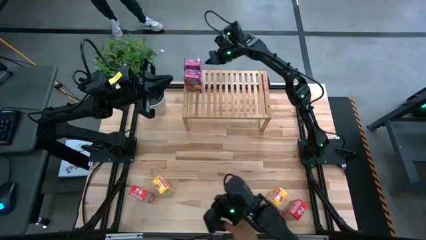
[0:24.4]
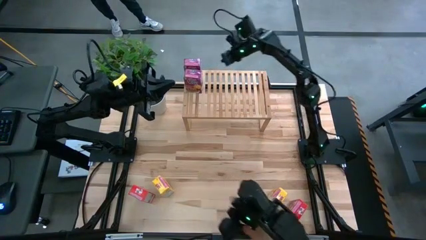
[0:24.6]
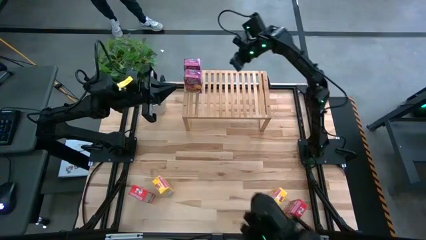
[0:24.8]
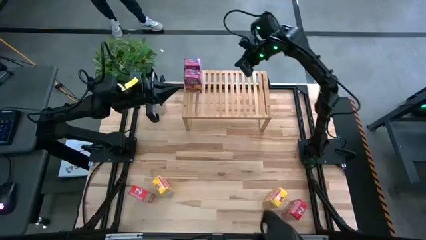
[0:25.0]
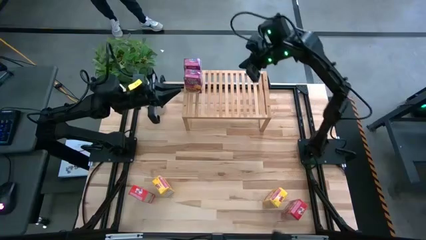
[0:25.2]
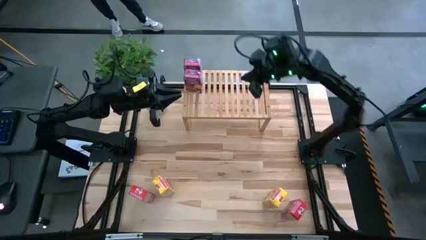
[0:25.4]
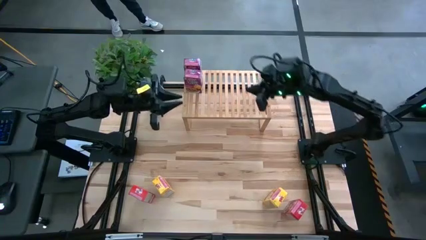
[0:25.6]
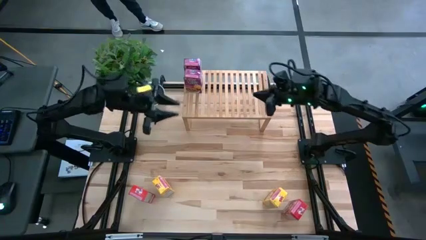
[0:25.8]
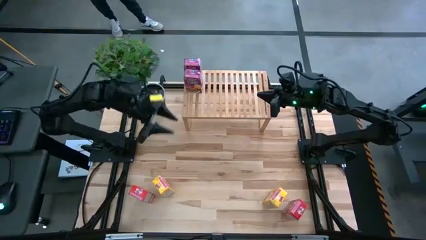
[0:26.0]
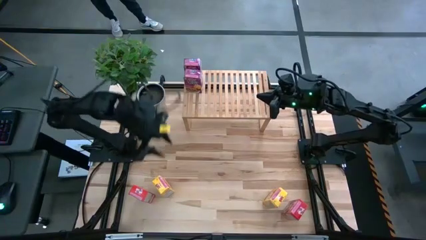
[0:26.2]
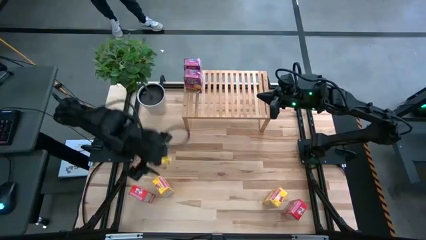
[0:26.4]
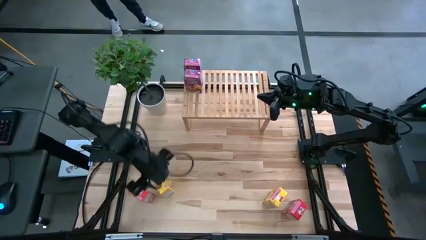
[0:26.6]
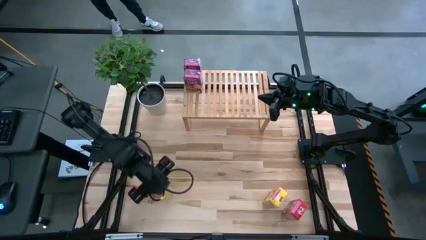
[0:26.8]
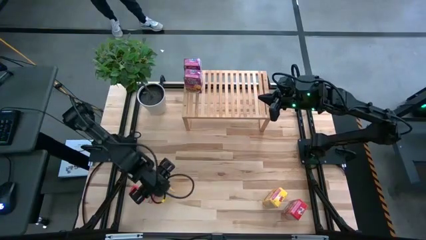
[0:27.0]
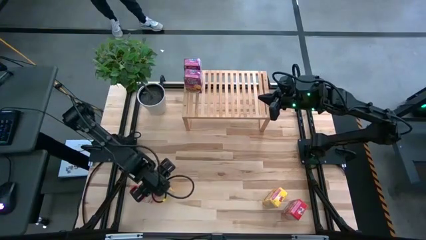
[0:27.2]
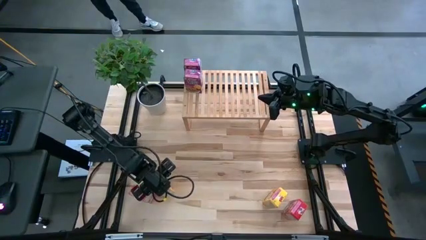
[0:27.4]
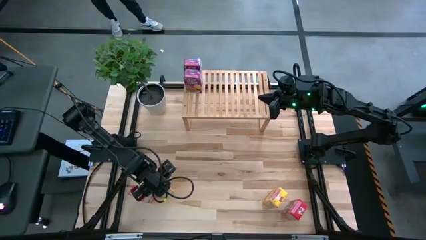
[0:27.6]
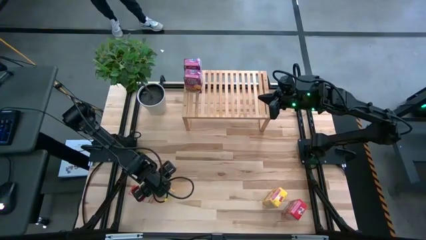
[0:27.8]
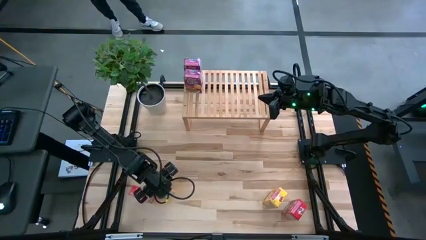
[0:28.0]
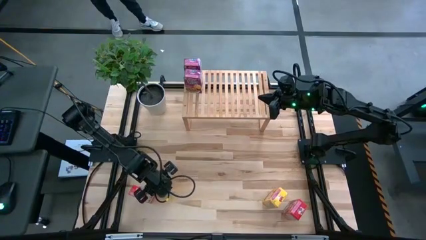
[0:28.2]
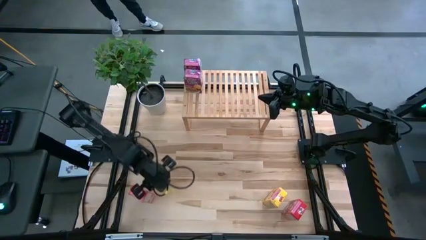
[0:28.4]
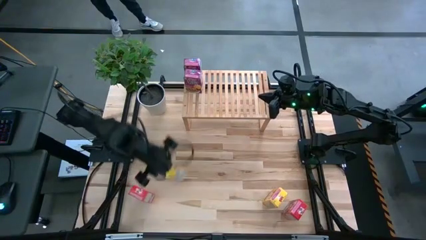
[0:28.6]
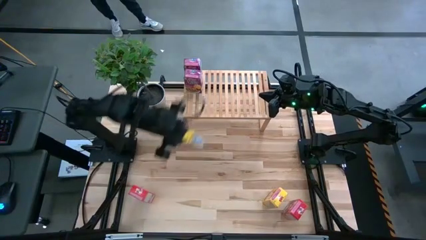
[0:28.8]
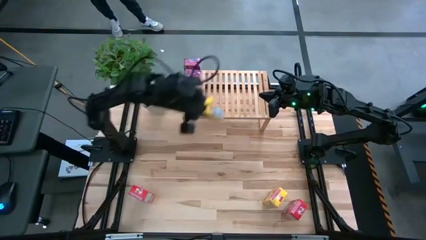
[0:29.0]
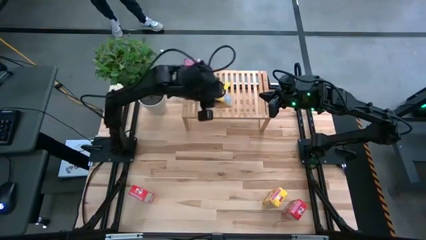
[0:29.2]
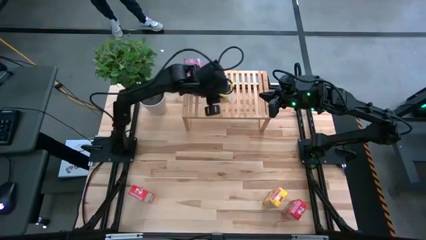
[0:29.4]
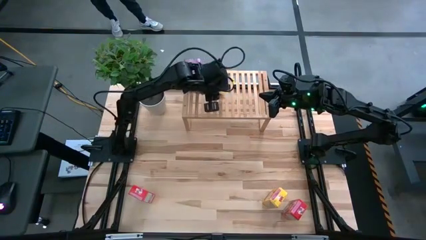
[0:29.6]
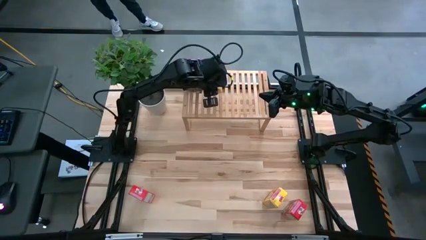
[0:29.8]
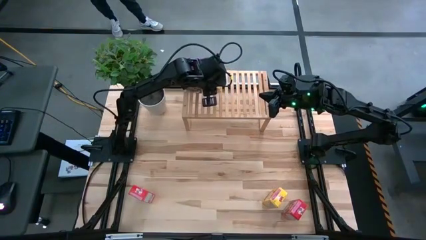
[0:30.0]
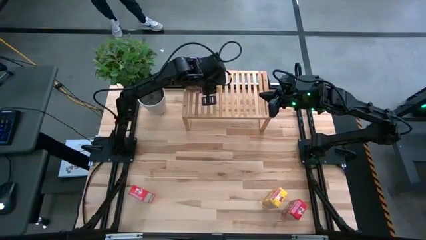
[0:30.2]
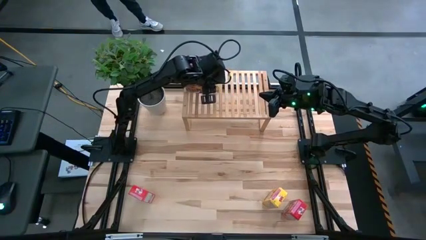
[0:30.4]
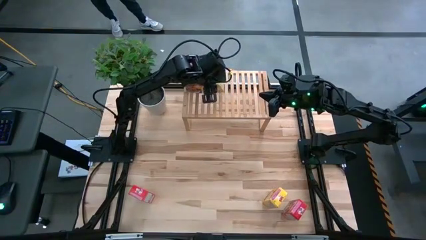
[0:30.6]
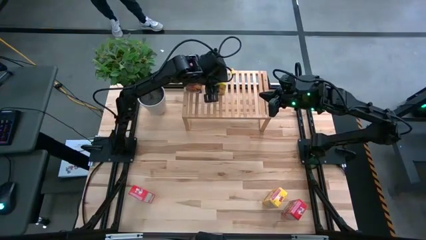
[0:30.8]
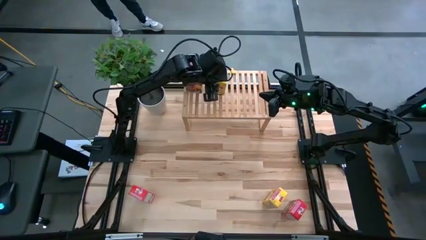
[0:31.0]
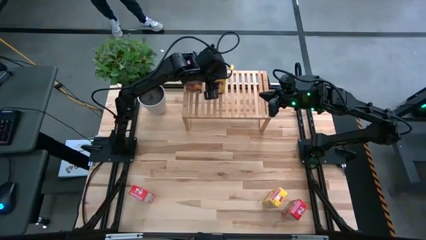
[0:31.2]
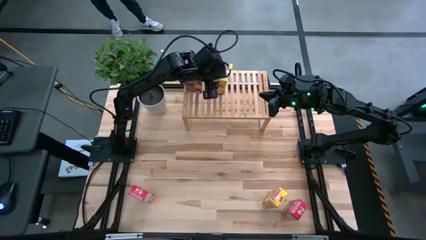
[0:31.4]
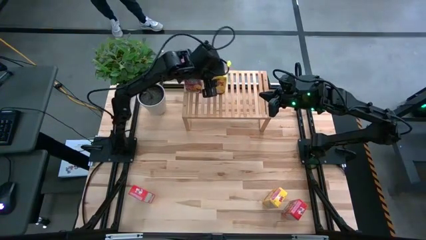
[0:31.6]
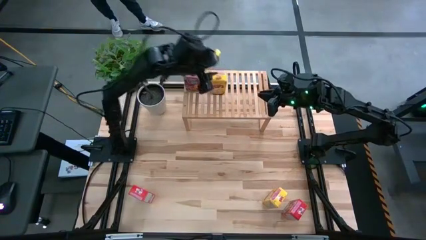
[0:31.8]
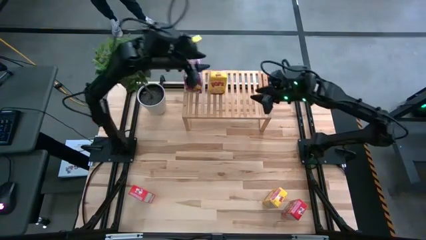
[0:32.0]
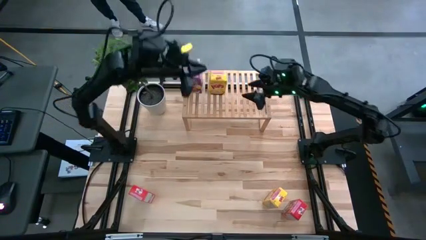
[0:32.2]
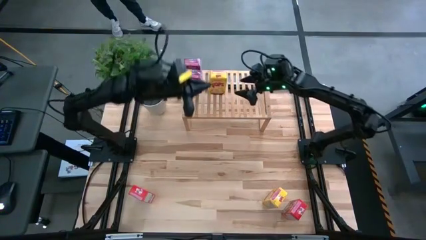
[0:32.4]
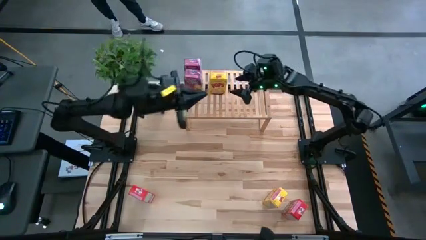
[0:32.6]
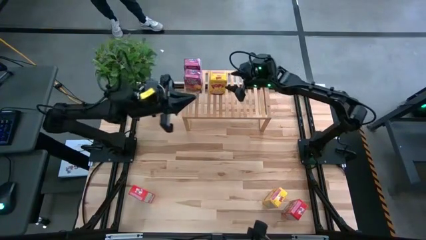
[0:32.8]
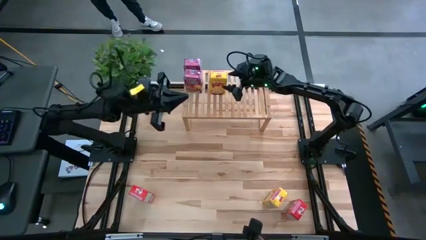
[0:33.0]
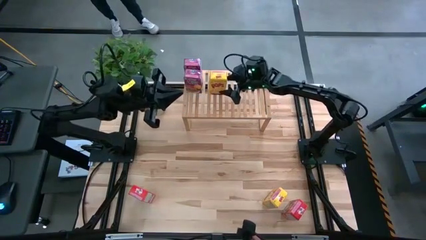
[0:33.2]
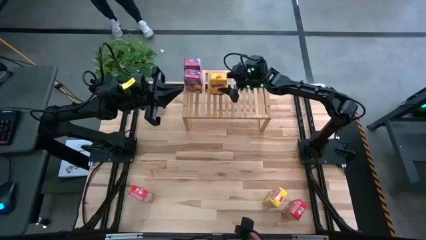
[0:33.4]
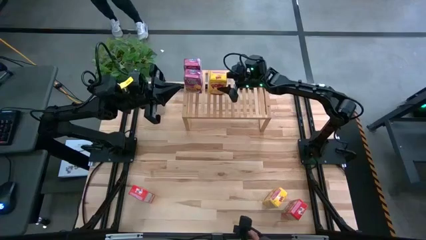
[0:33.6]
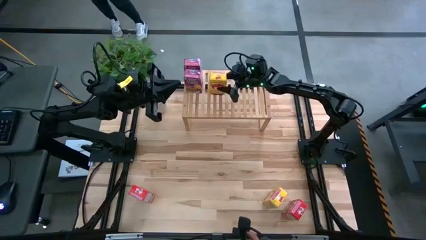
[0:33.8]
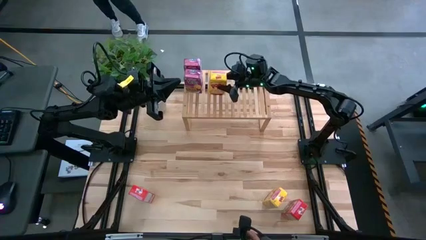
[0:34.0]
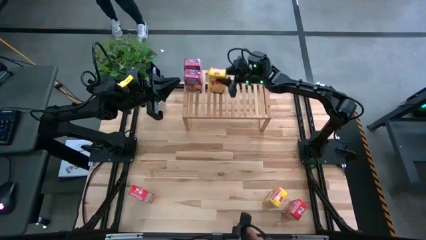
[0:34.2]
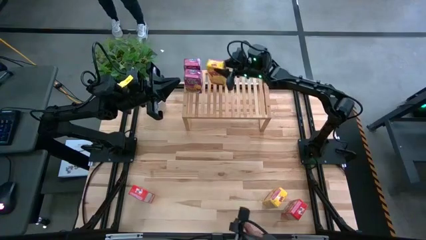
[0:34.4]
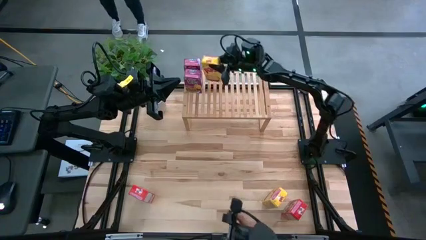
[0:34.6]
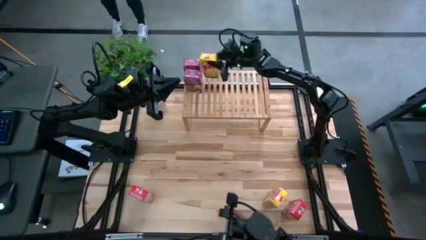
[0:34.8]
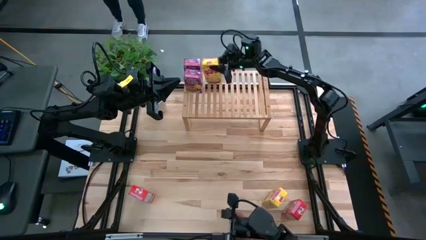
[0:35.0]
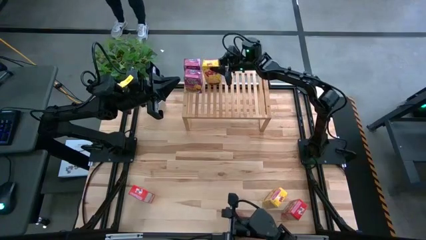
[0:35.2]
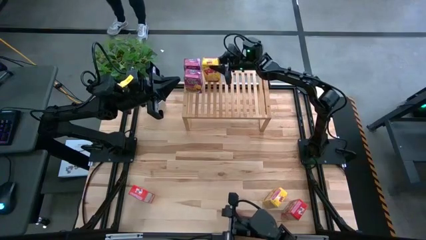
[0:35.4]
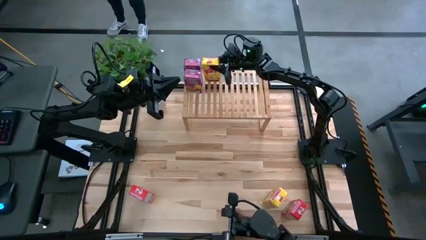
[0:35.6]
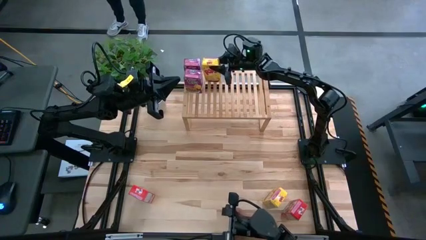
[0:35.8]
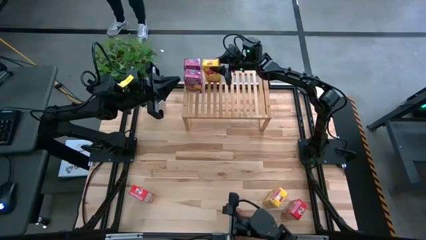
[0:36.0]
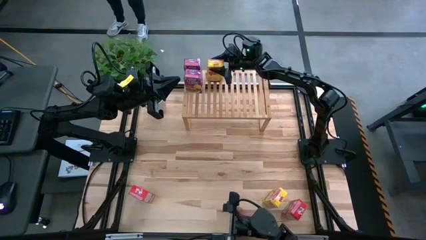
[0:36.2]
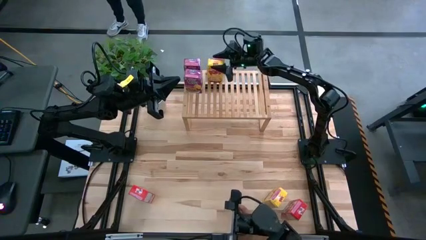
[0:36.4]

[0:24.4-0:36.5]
Task: Stack cereal on shelf
Put the left yellow cereal box on the shelf

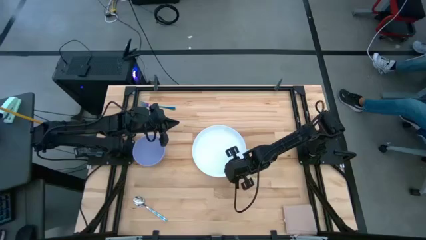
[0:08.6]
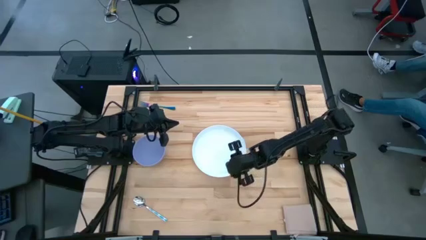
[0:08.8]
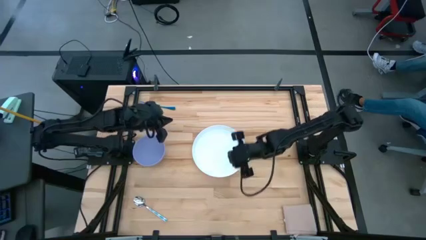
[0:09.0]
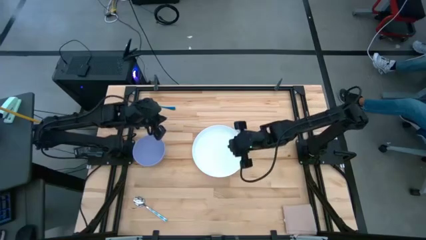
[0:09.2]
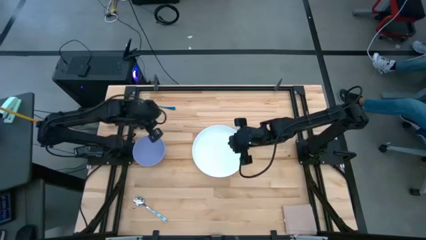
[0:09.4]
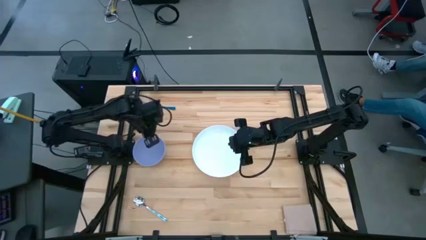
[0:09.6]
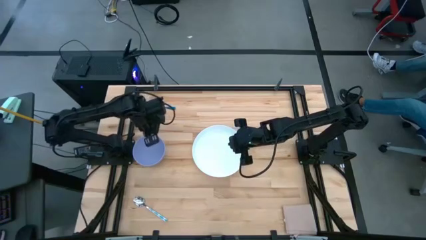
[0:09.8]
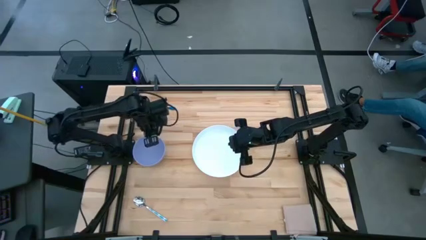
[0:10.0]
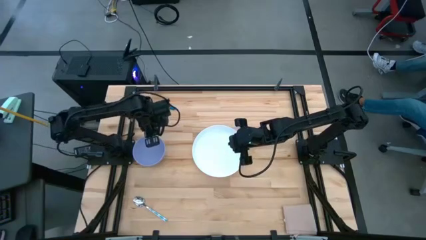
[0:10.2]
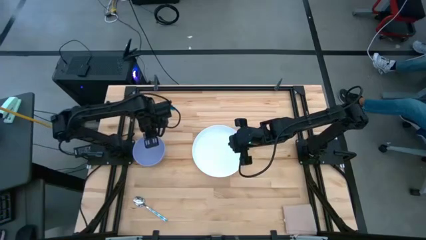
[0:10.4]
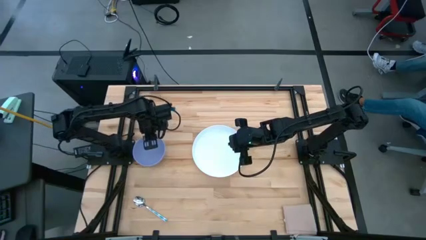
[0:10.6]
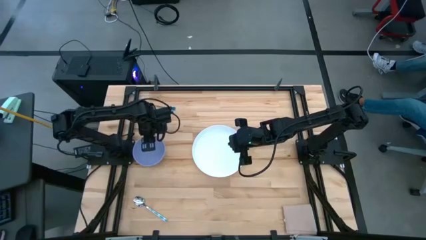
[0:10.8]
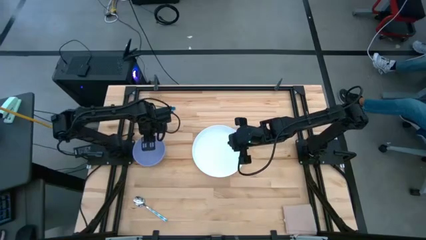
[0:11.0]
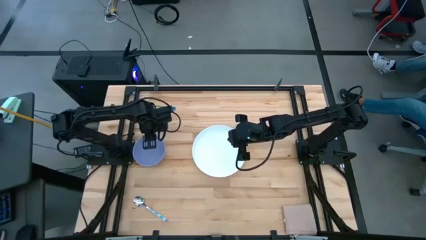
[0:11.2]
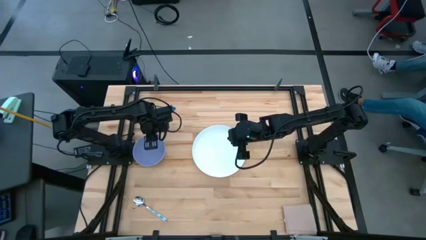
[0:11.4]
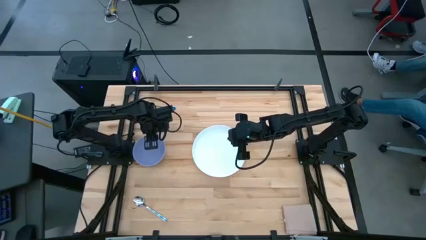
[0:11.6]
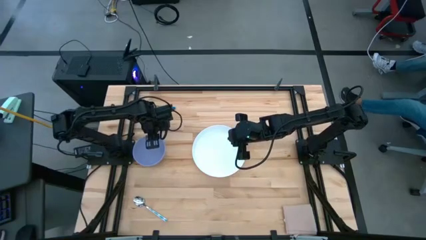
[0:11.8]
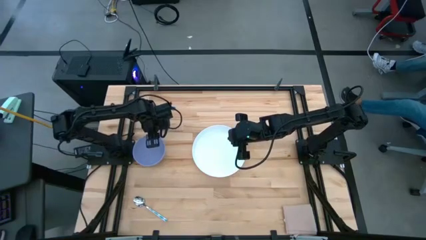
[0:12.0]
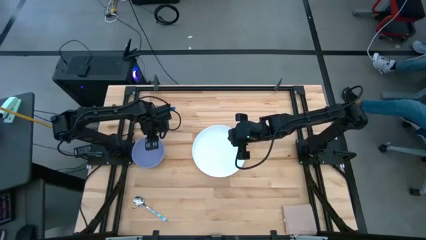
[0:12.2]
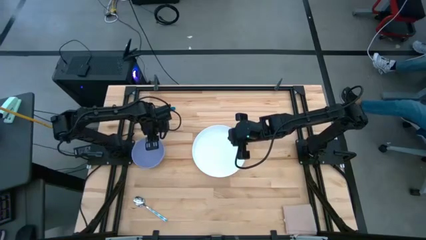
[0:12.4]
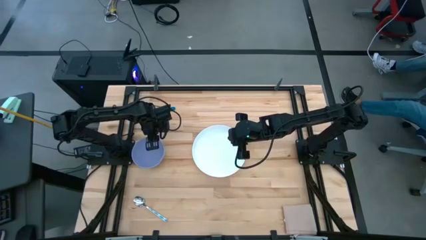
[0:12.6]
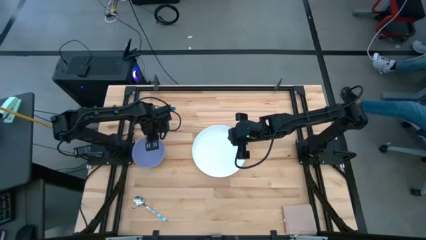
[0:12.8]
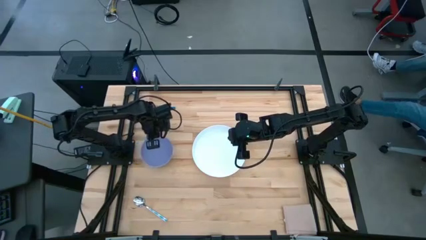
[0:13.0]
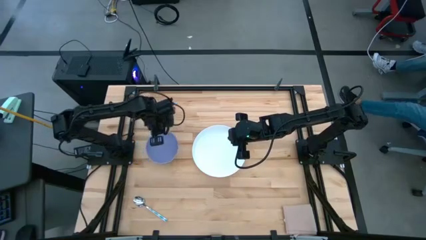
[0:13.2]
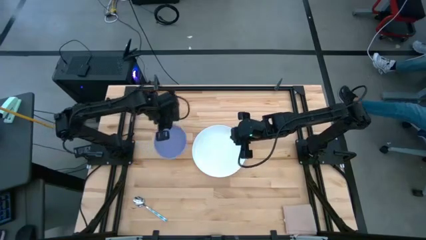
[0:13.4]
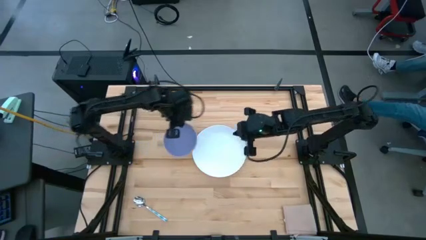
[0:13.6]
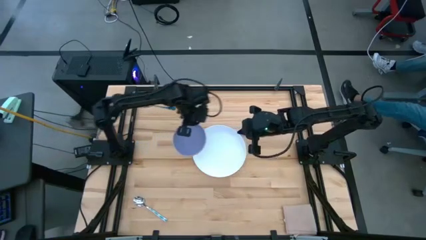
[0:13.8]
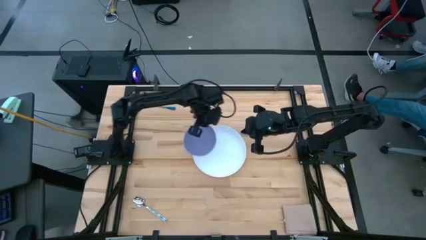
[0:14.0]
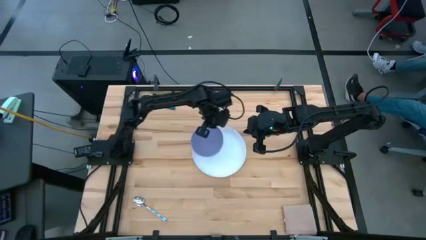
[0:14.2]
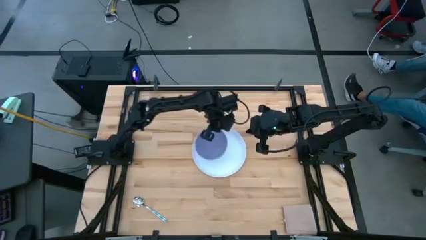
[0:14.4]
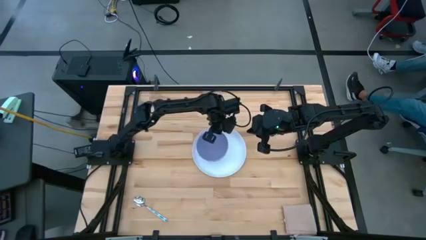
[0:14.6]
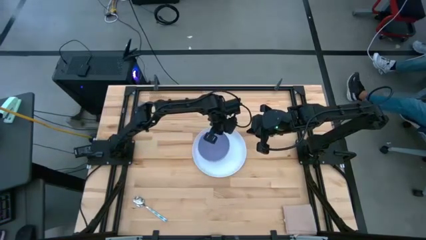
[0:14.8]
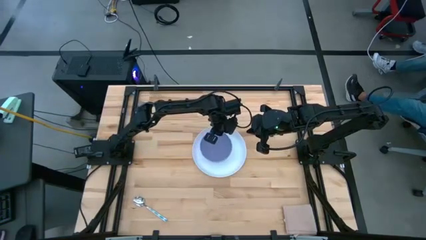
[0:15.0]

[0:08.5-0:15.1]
Task: Set table place
Put the bowl on the plate
